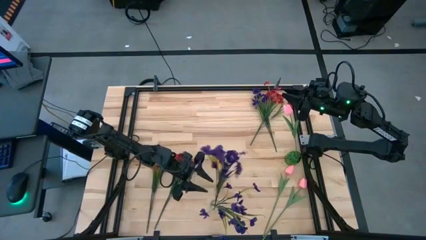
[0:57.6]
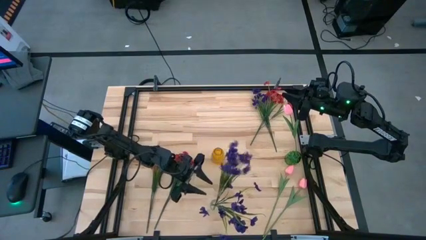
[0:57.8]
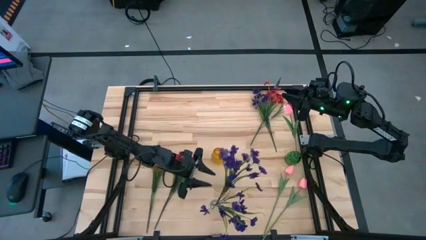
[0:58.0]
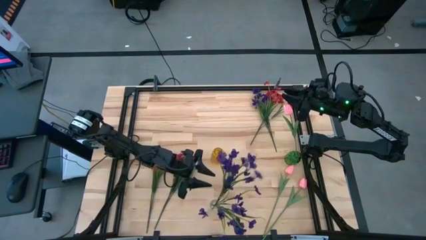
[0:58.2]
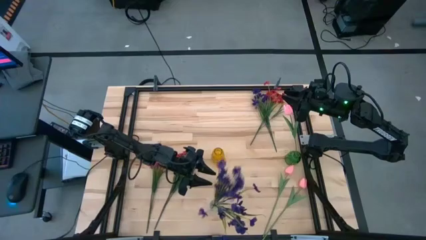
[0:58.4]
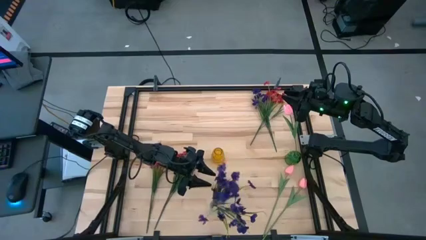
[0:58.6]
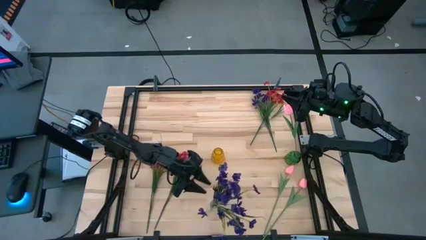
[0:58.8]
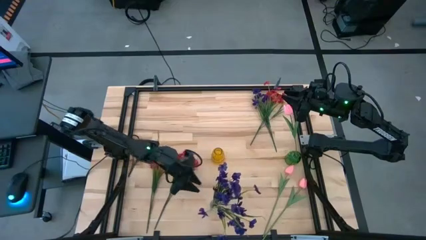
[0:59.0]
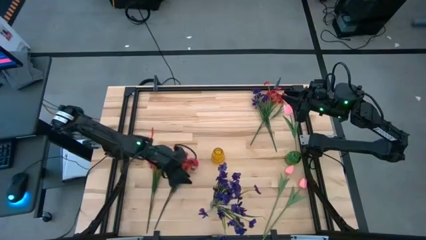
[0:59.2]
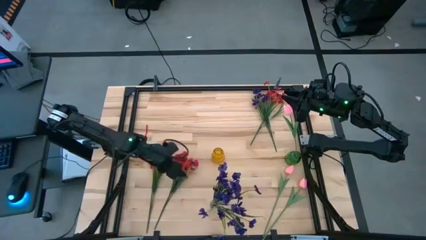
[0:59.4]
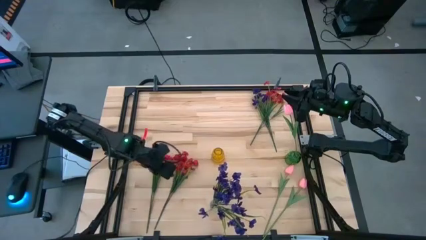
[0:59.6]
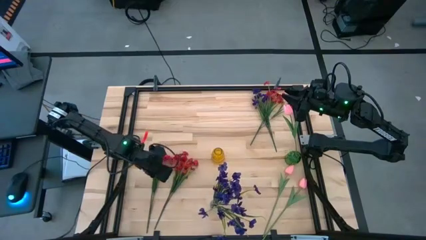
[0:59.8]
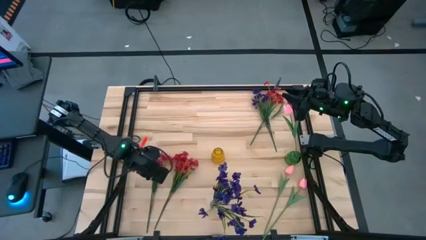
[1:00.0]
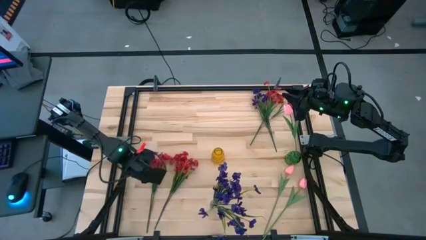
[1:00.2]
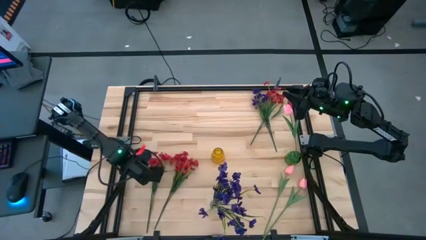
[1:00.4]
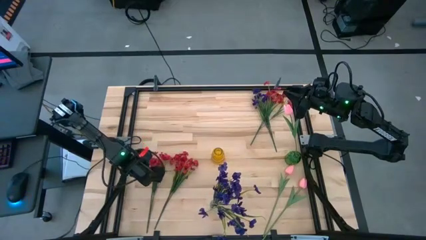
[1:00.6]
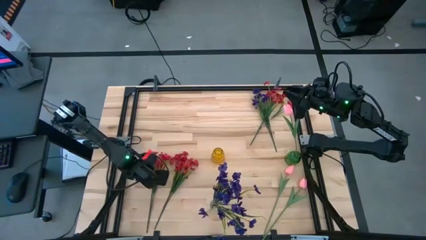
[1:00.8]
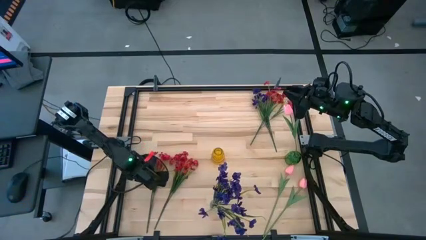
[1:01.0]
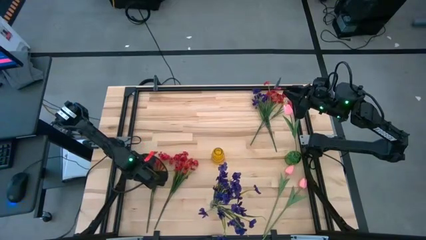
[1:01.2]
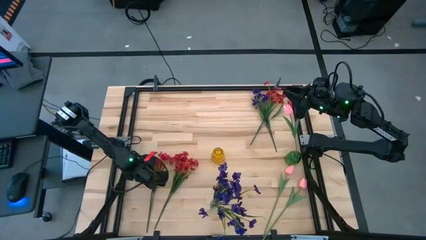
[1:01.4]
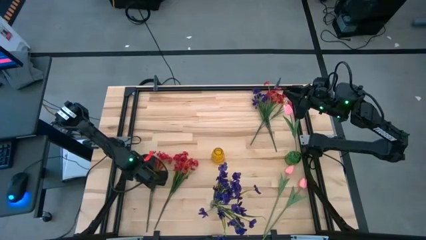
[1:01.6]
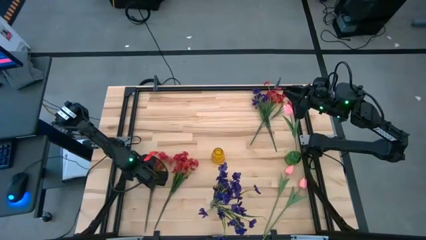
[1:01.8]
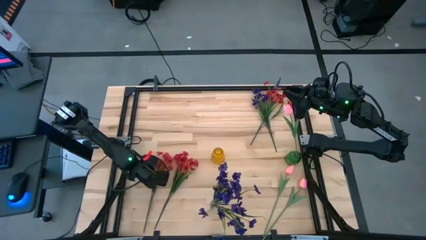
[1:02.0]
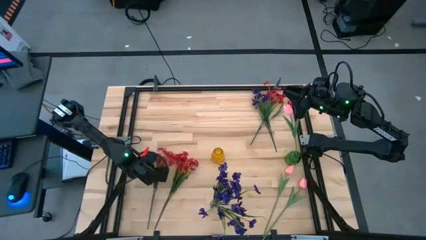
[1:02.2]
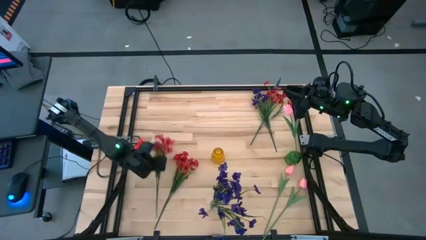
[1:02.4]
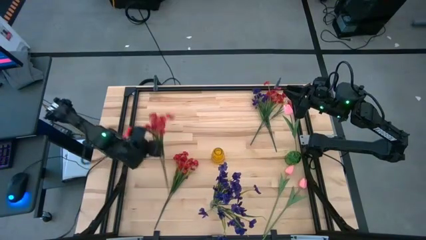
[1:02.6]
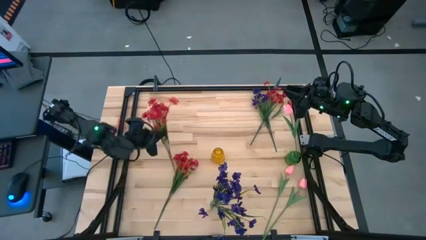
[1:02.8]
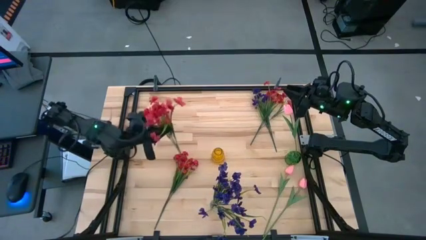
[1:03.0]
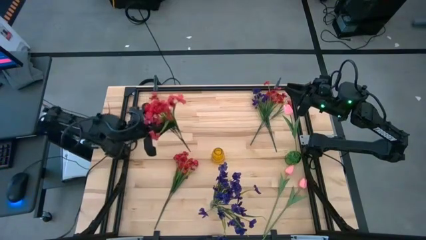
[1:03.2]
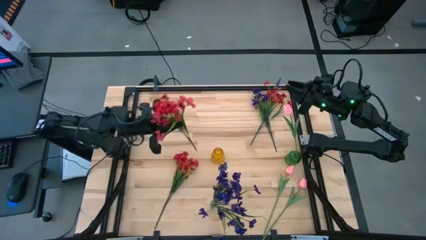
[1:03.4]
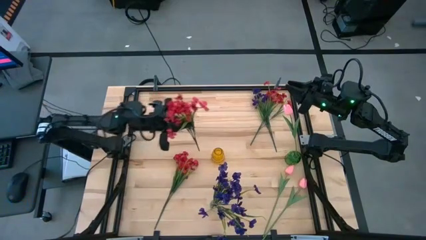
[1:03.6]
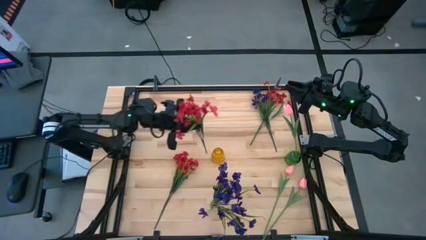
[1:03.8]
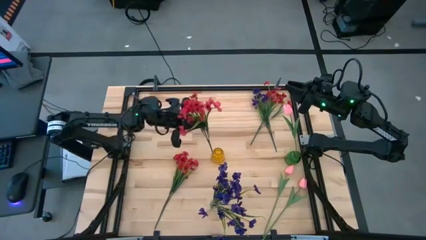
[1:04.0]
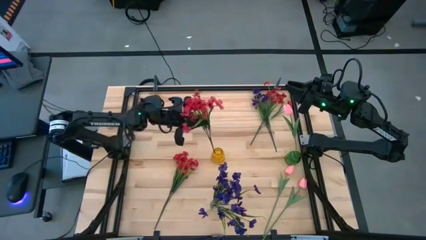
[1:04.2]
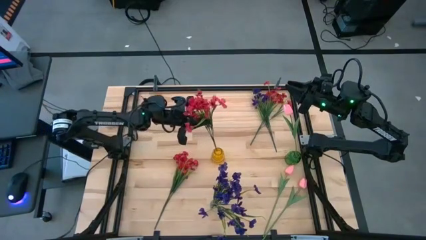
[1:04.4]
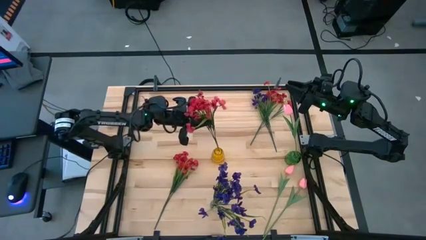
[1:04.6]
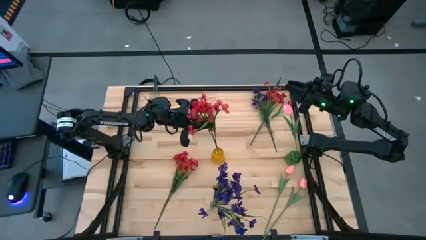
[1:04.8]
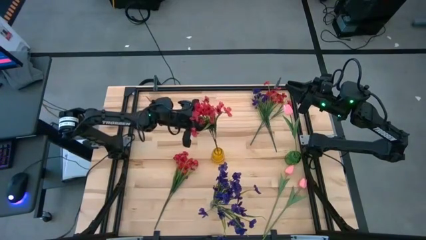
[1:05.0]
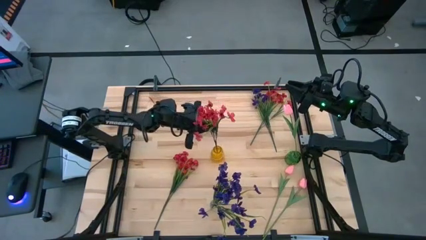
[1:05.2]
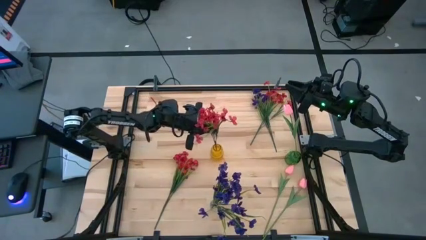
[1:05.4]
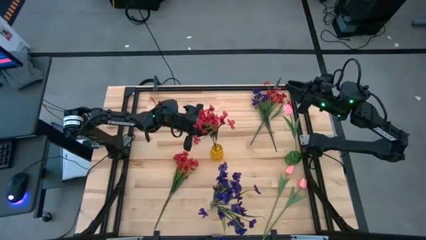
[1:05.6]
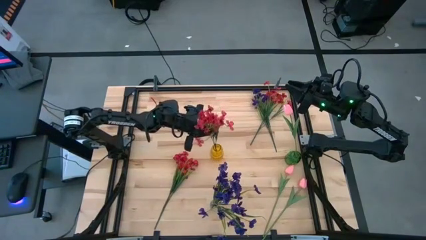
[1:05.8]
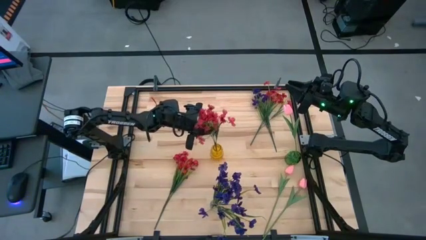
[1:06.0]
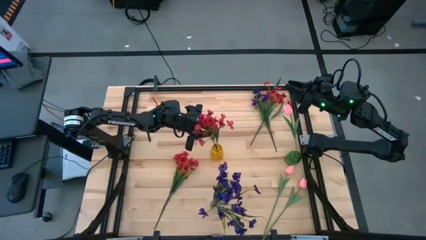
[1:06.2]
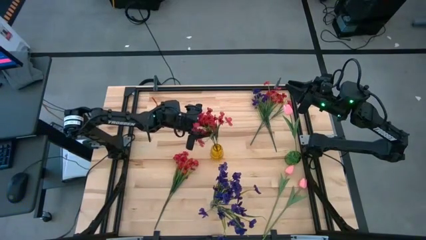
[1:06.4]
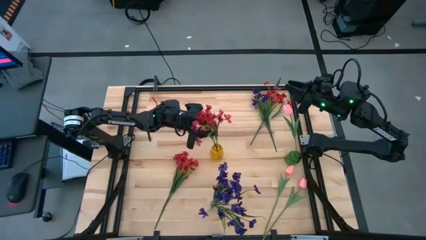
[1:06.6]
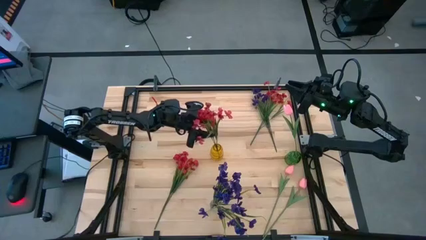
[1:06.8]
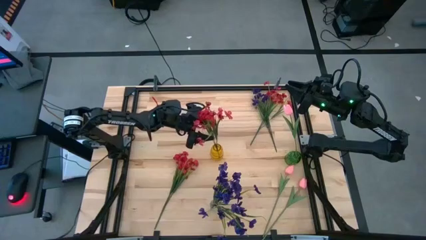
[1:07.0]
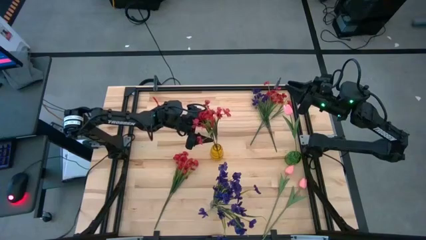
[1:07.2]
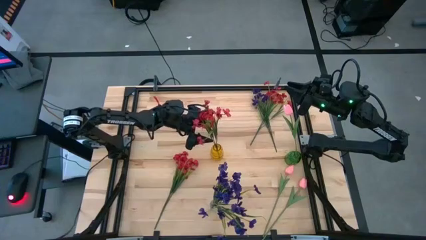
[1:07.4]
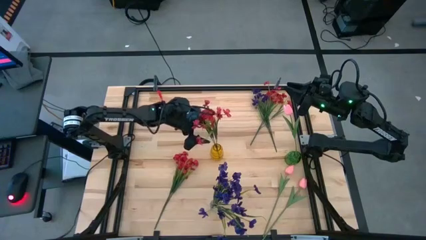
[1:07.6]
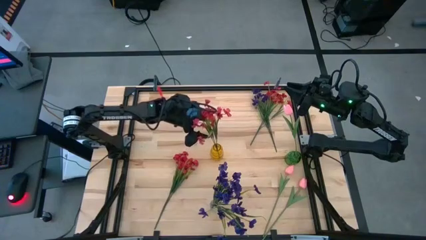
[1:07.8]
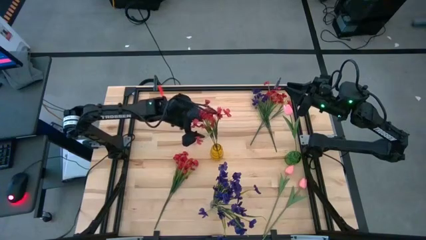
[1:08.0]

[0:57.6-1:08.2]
Task: Sort flowers into vase by color
Put the left red flower into the yellow vase
